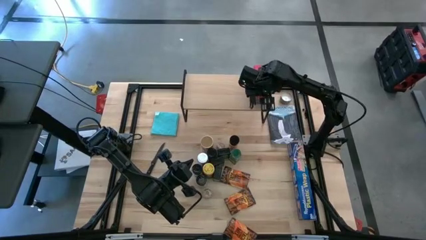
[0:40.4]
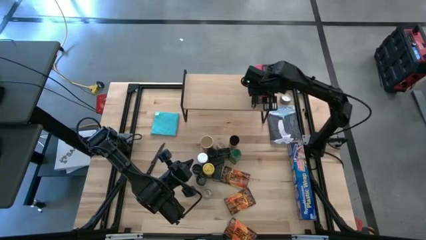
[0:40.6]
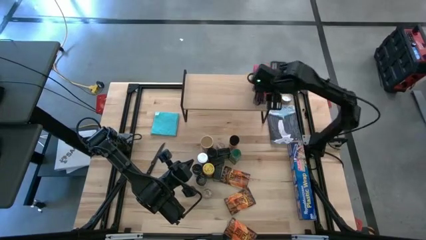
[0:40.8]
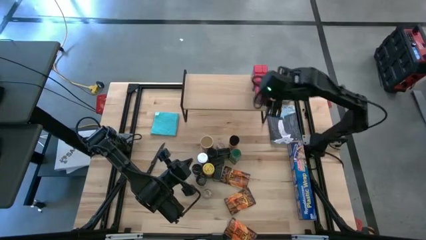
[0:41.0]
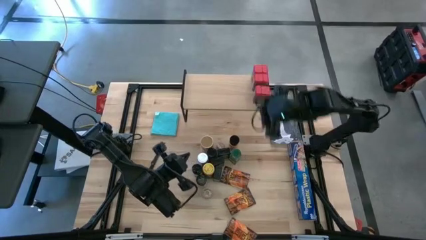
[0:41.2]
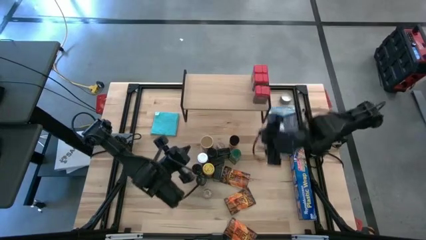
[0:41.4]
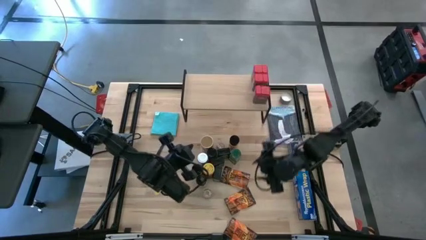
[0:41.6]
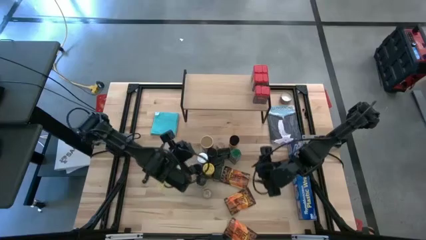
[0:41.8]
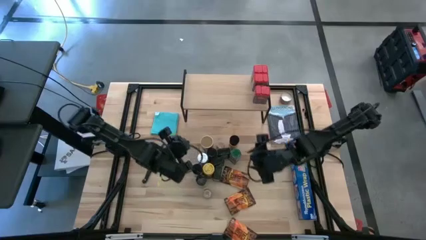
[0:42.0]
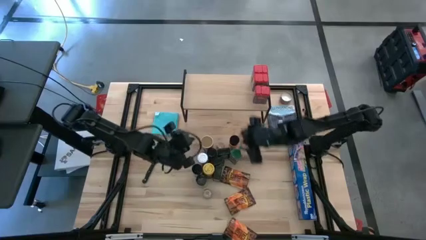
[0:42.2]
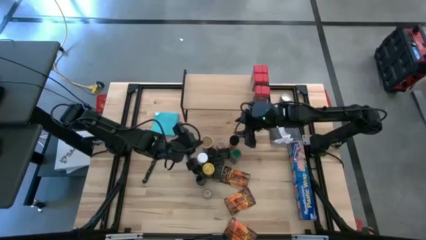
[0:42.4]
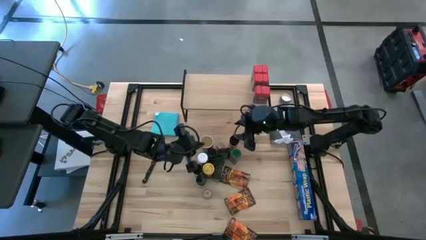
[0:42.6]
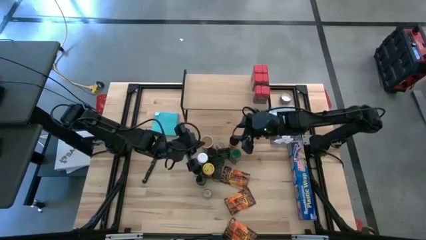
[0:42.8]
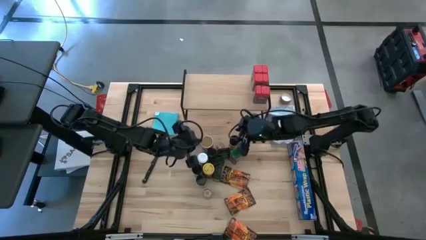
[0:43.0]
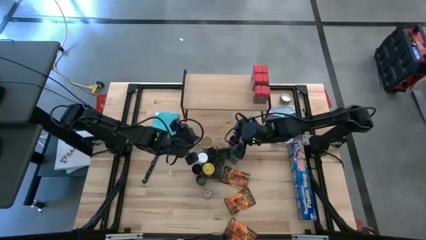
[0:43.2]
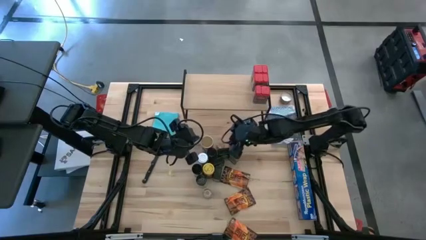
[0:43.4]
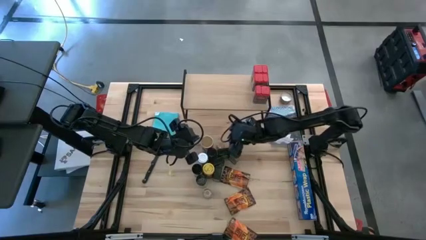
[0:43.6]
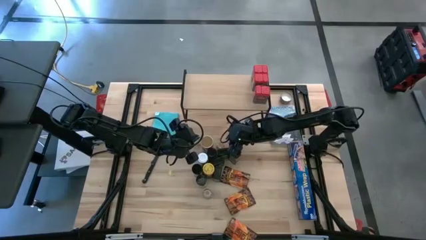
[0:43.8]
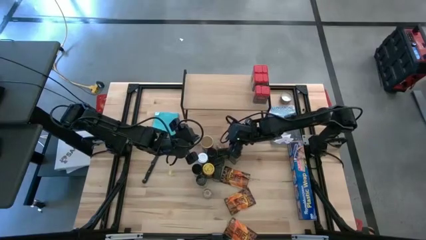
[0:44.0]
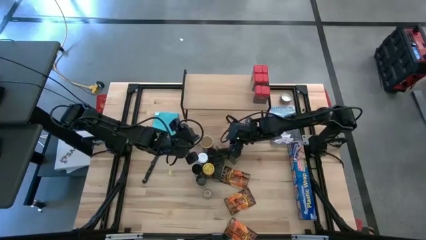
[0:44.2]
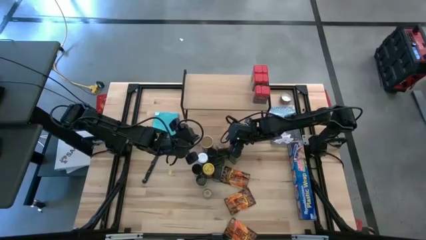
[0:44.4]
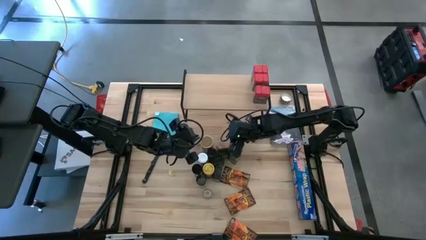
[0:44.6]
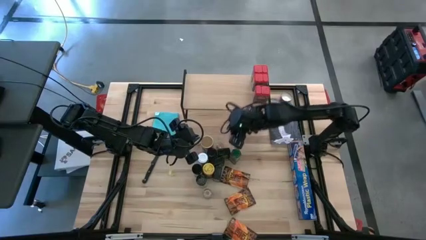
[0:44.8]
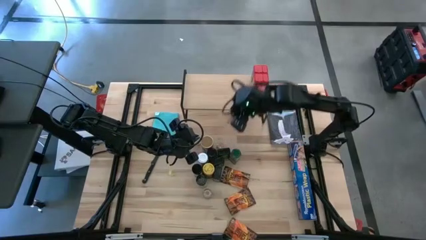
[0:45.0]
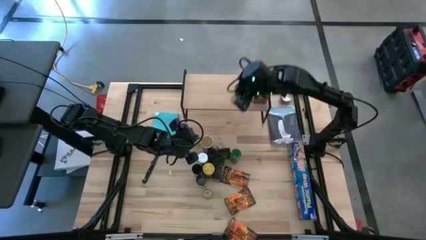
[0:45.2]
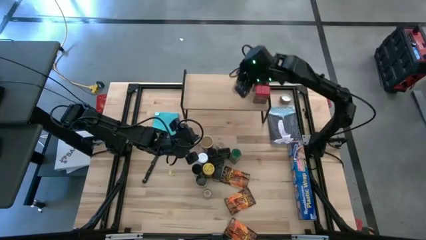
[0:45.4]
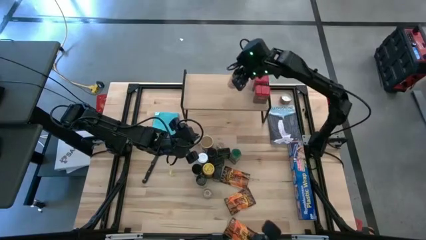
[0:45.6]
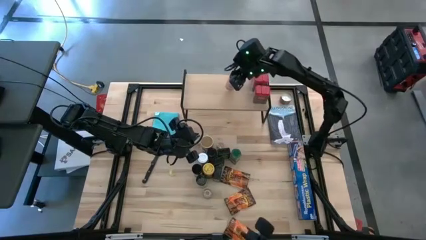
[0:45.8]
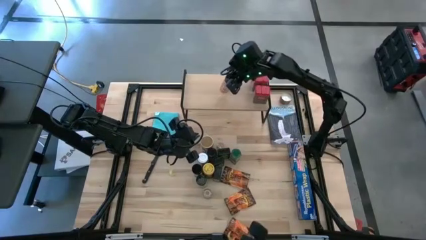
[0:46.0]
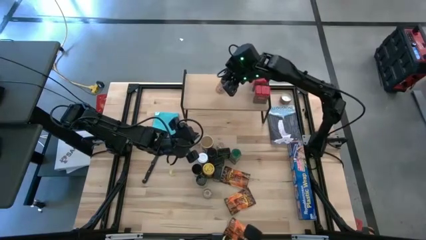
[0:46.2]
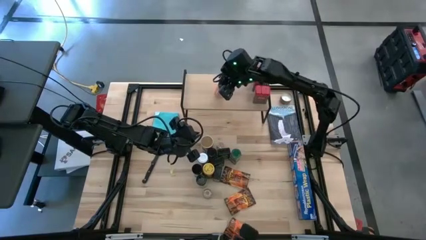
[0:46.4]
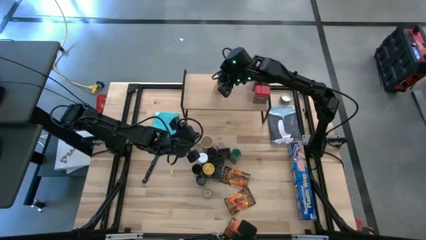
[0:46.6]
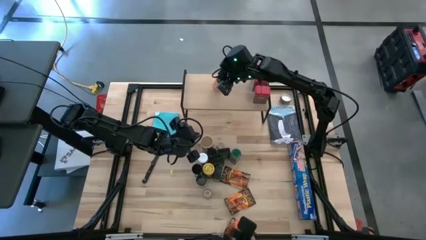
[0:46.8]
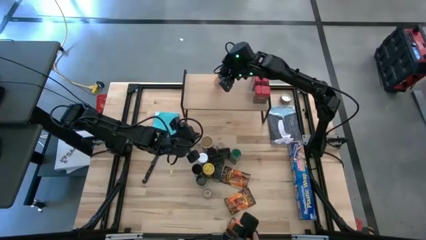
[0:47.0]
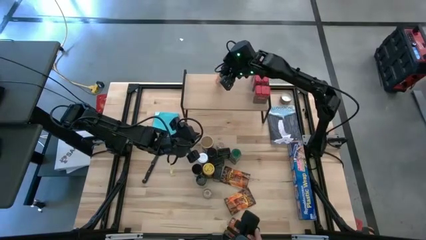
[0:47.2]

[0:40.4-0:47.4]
Task: Shelf spices
Put the black seasoning bottle on the shelf

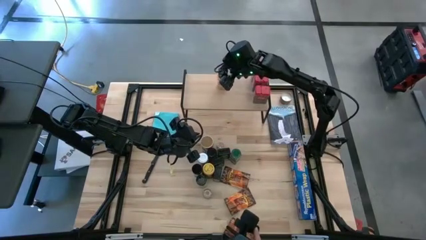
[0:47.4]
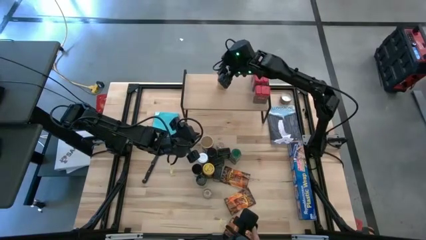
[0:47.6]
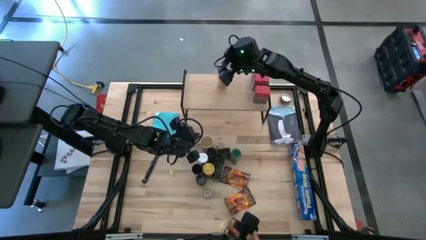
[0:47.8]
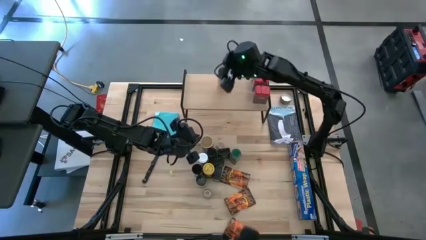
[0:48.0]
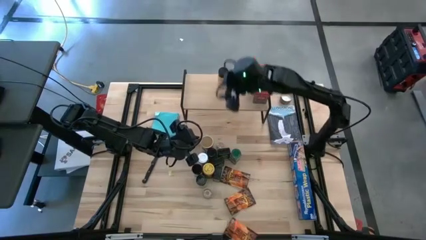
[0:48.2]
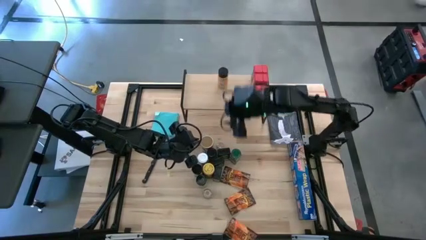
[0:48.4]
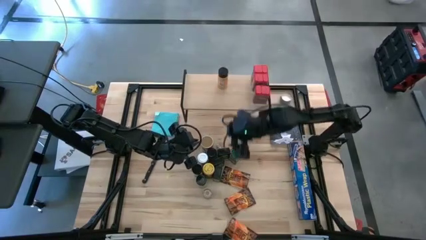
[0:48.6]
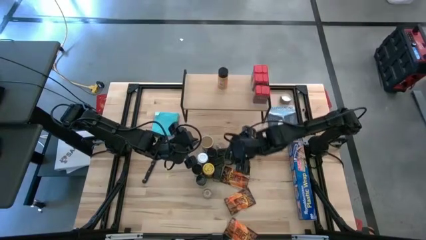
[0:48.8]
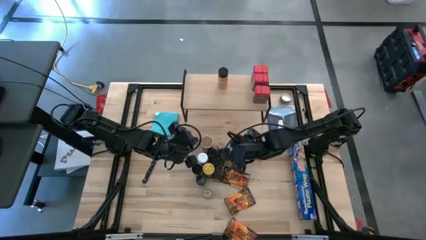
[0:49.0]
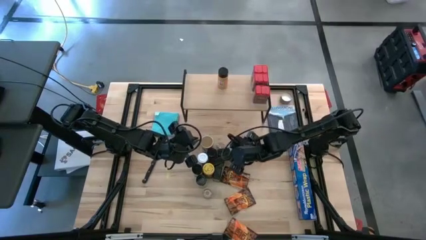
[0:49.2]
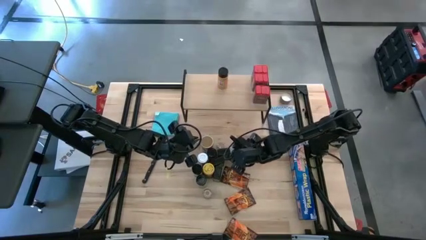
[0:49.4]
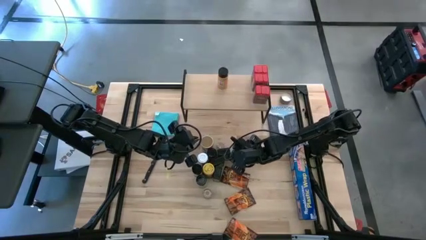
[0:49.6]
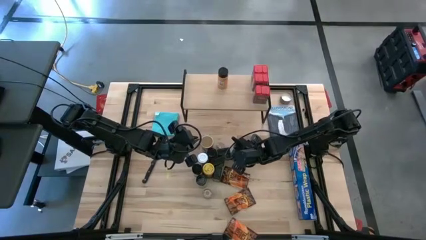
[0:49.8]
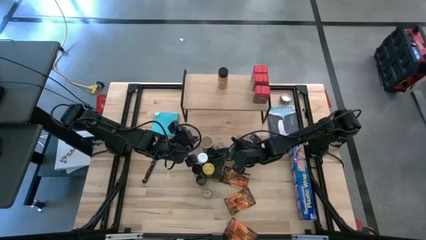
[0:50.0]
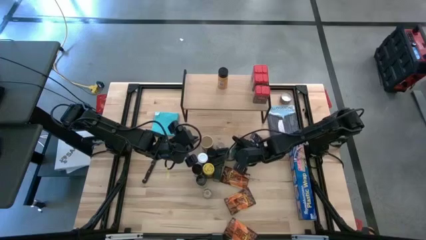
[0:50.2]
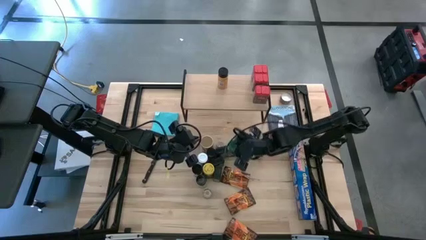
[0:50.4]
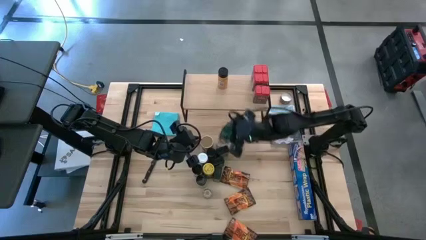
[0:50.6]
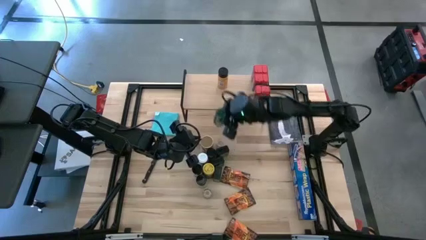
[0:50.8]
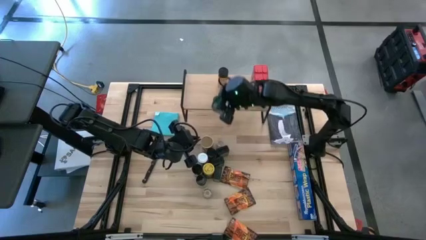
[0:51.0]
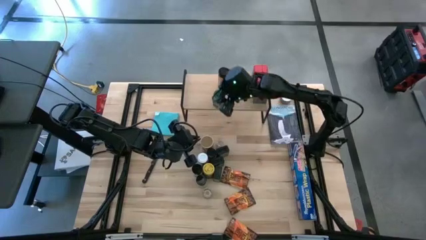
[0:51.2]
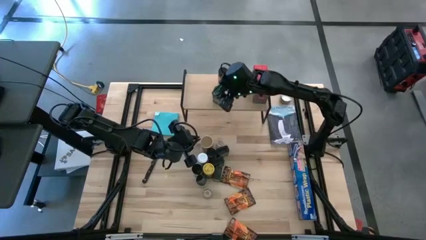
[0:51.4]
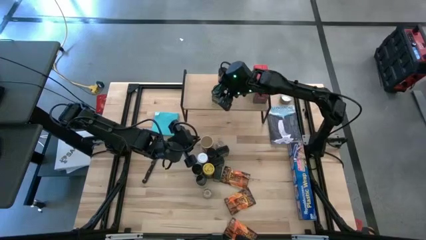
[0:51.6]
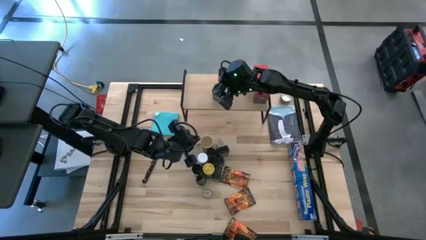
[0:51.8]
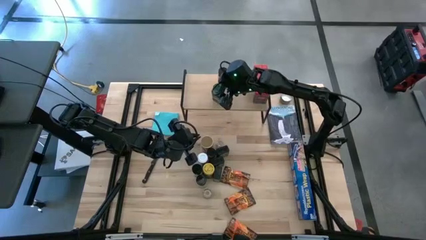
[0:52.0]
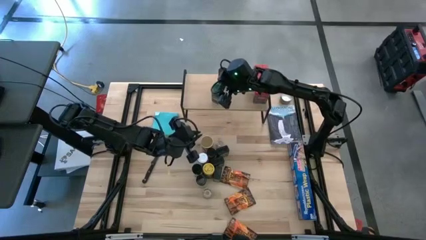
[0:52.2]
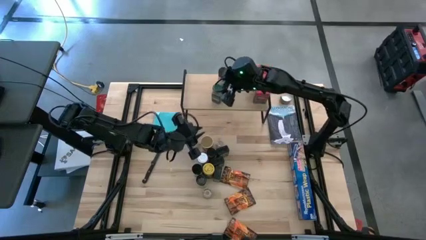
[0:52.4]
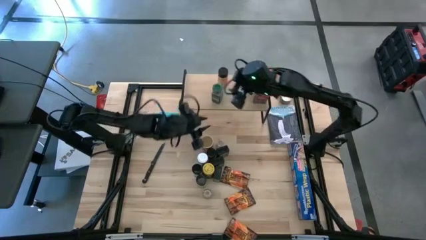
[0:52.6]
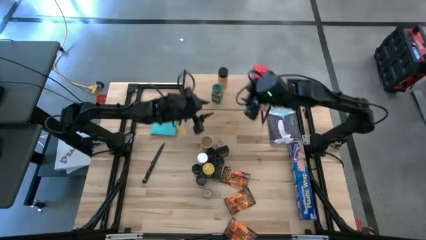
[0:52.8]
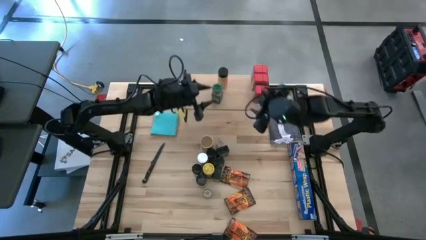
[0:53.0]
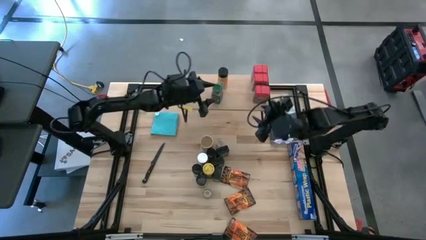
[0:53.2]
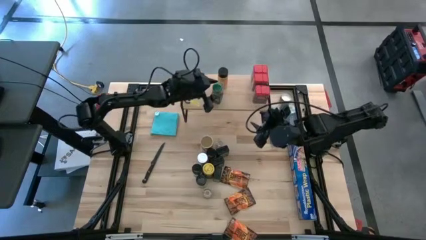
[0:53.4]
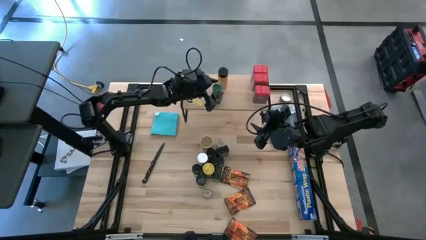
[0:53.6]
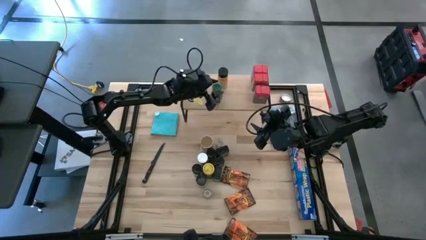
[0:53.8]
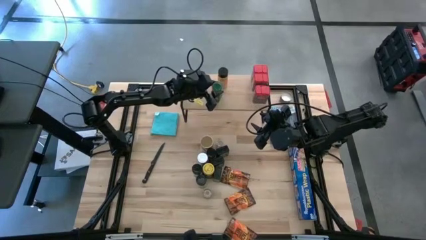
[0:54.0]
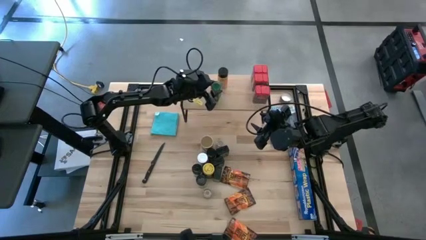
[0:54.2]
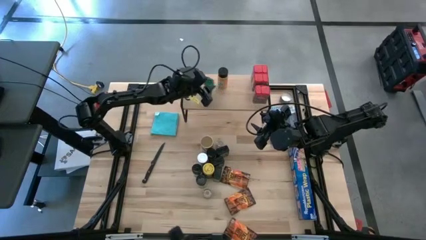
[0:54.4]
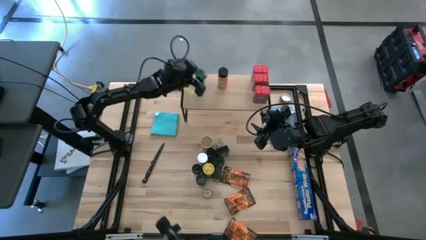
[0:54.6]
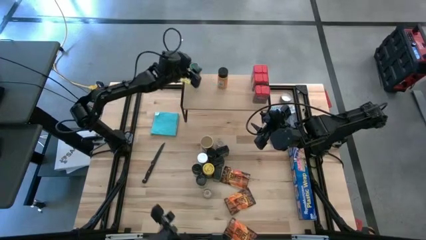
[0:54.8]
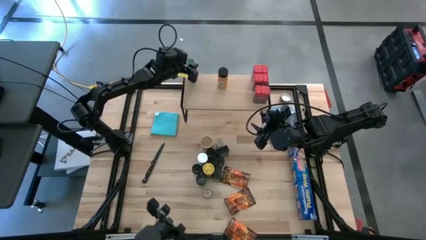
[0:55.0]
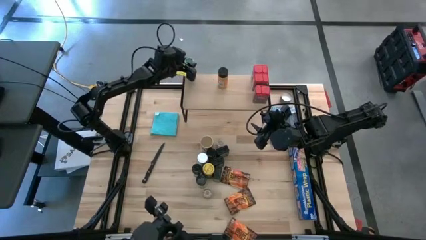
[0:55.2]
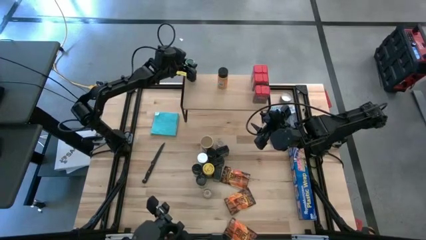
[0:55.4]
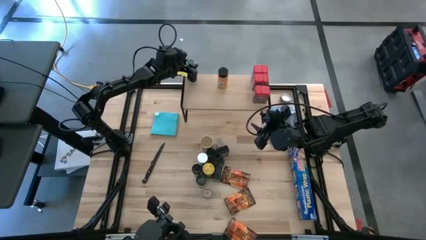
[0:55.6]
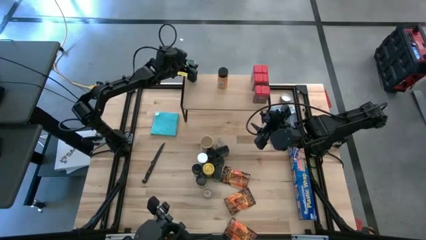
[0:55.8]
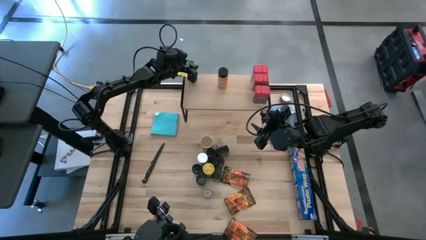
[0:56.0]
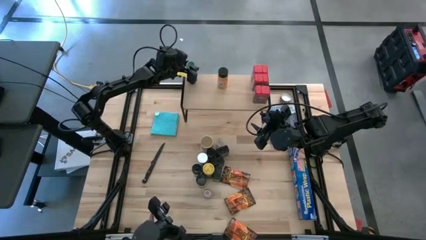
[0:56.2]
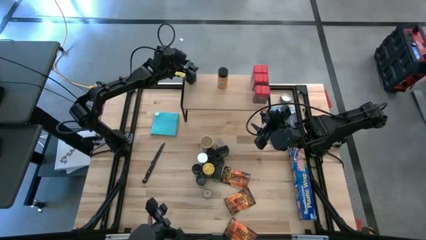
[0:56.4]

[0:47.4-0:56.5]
Put the green seasoning bottle on the shelf
